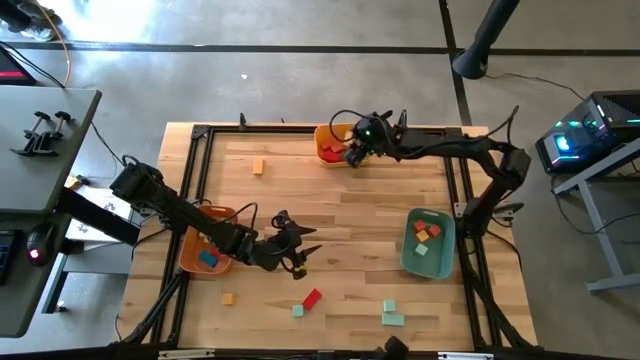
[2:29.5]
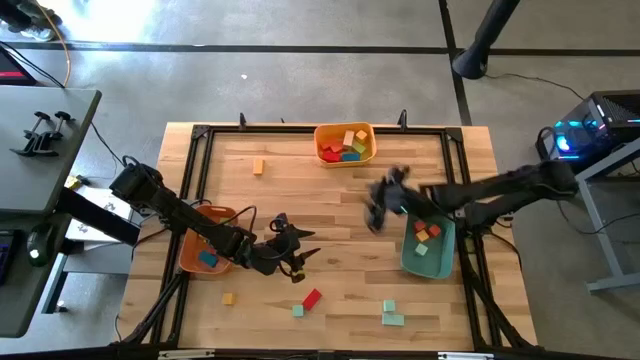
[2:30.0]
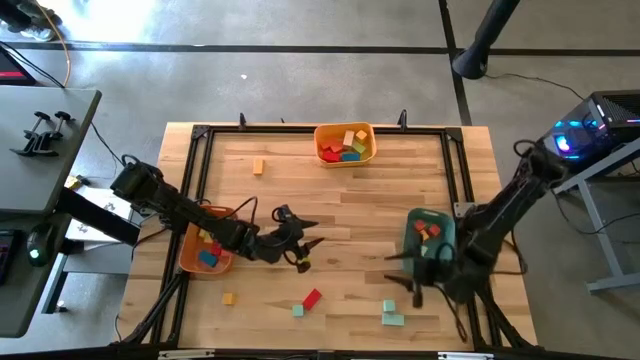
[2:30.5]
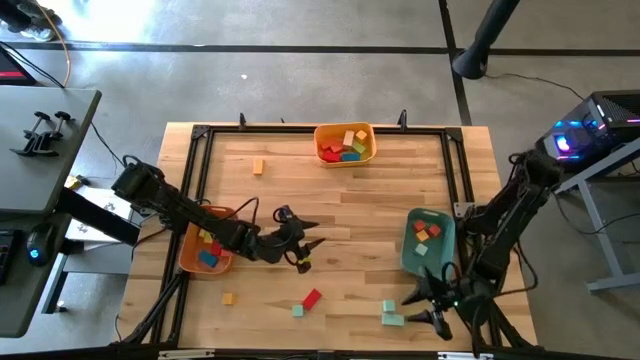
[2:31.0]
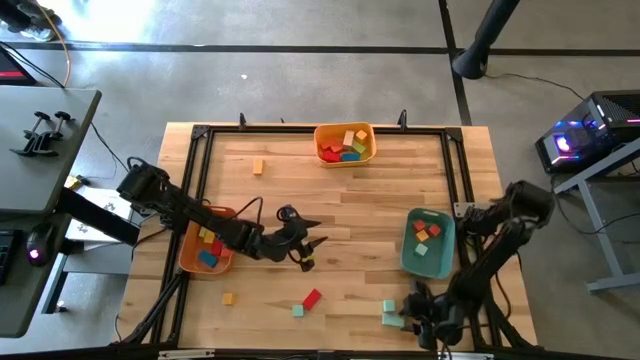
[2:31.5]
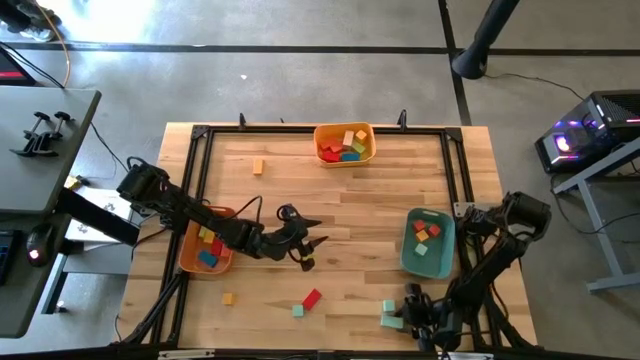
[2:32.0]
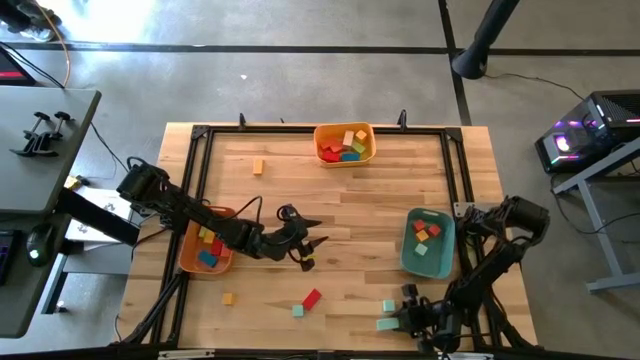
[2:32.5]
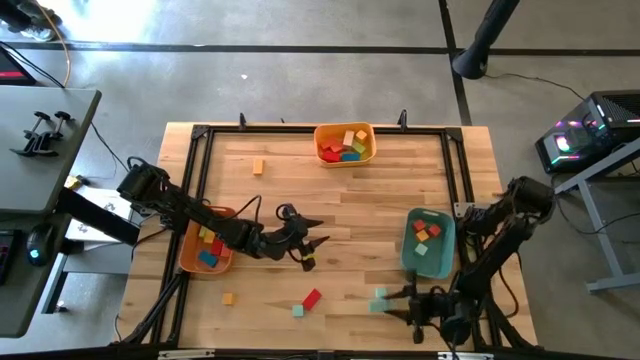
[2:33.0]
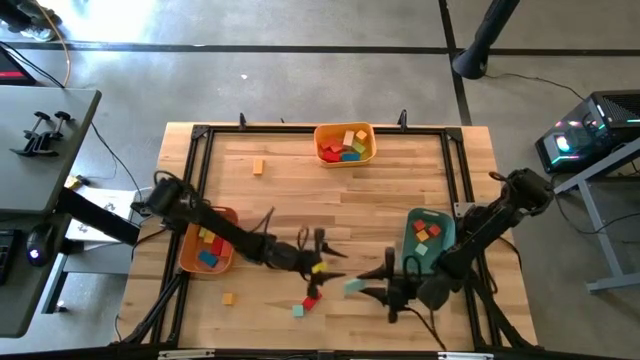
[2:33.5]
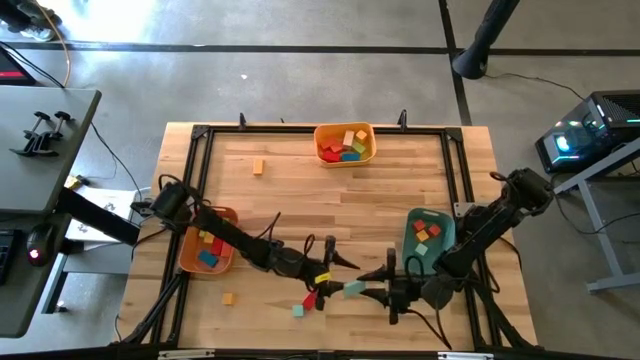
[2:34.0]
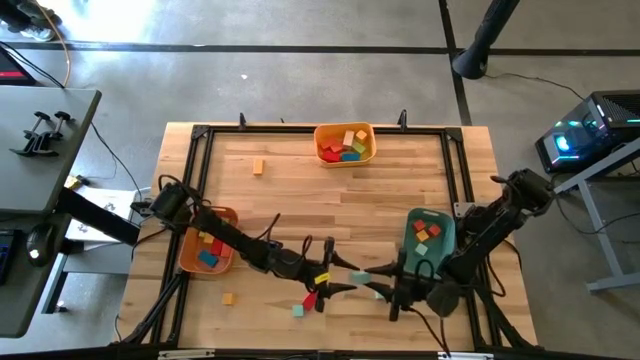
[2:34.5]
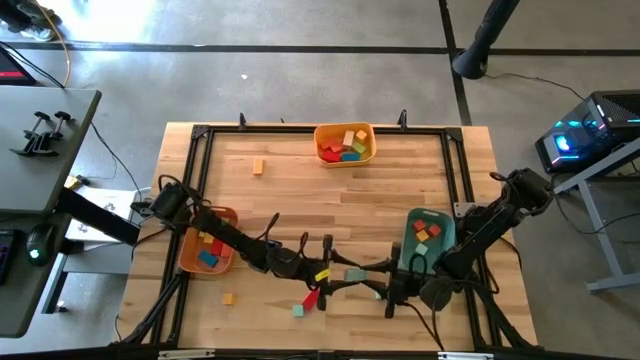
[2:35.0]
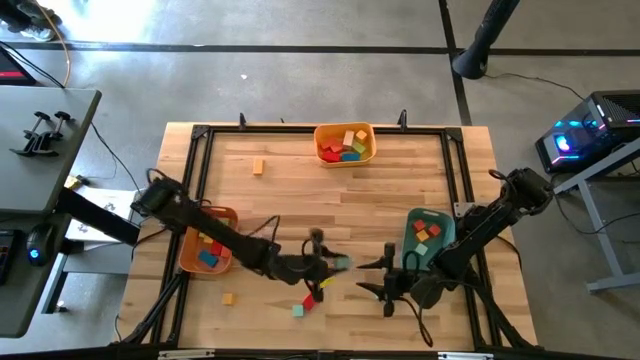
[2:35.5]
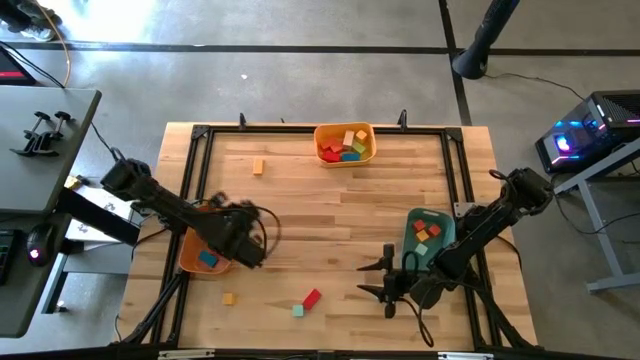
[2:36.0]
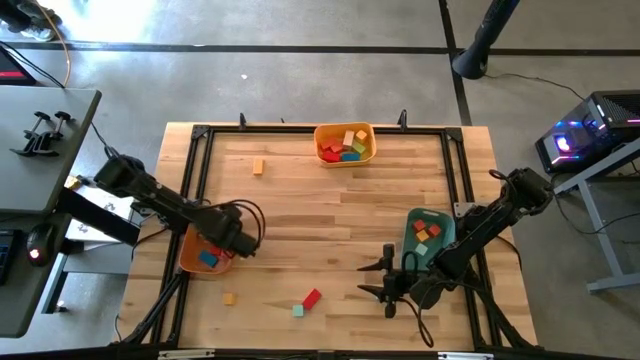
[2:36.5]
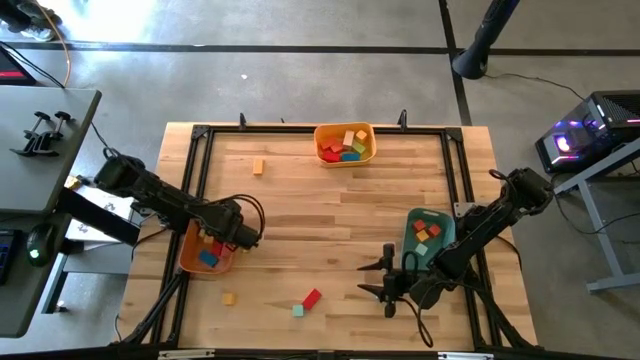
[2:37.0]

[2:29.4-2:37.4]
Task: Sort blocks by size
Put the light blue medium block into the orange bin

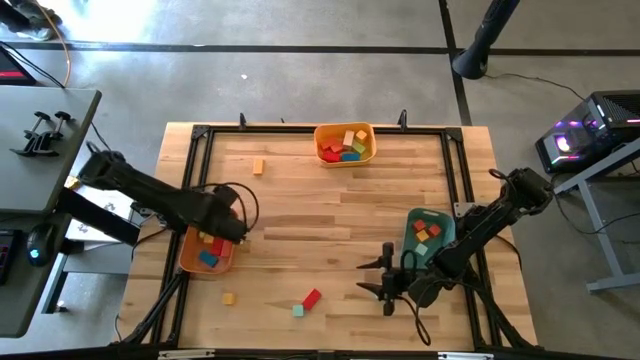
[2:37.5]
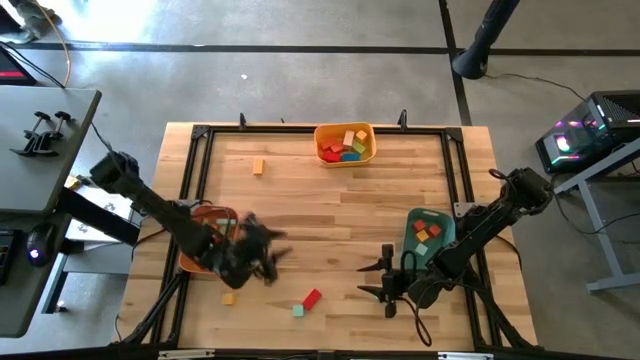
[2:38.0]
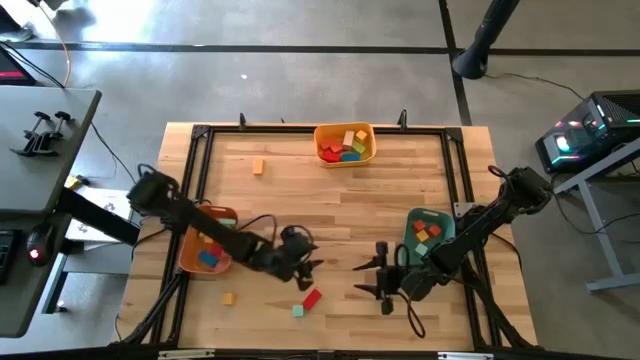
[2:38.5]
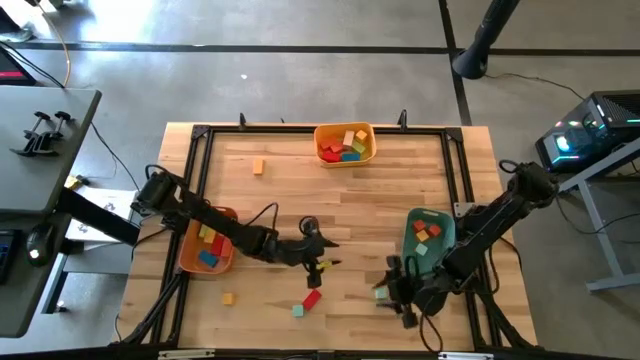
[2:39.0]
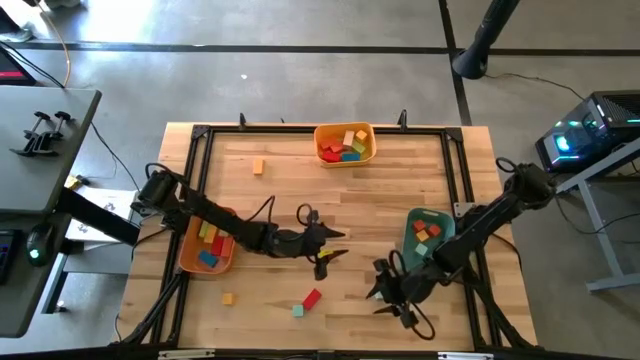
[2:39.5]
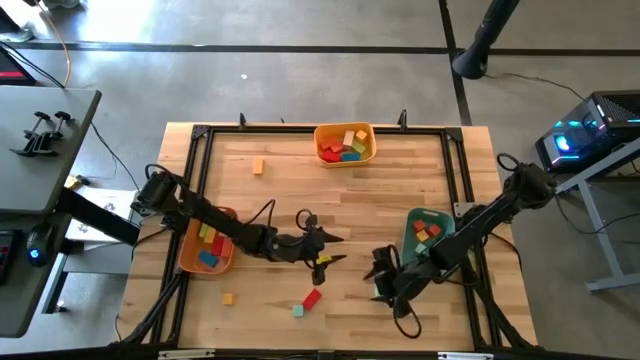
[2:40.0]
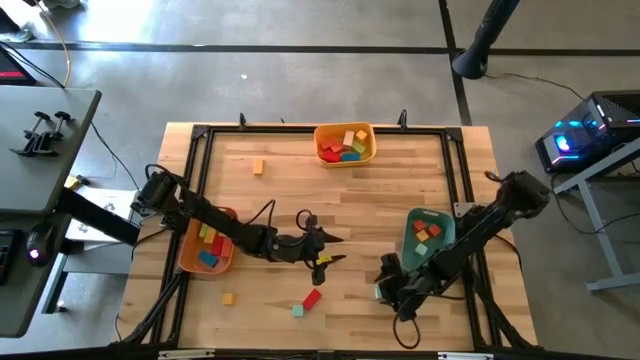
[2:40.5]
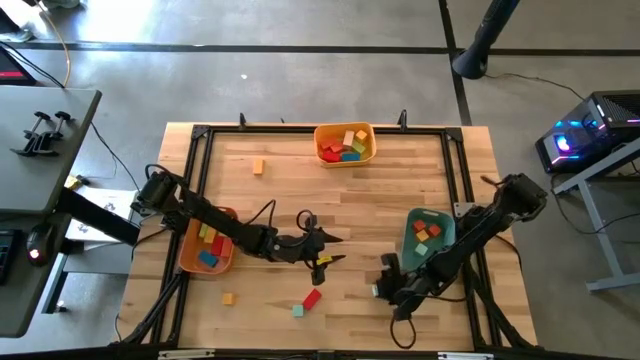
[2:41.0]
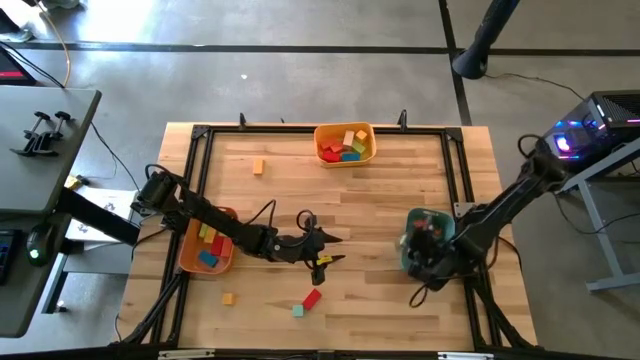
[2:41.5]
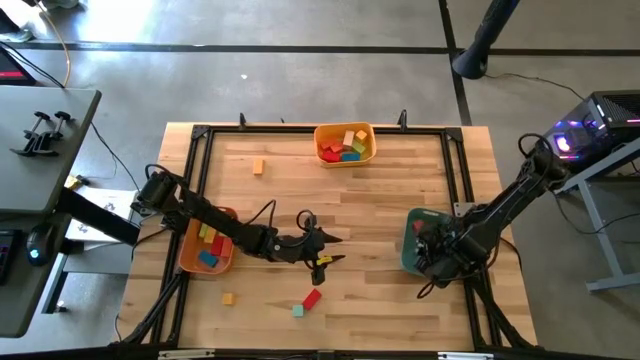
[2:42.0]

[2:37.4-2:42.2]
Put the light blue small block into the green bin

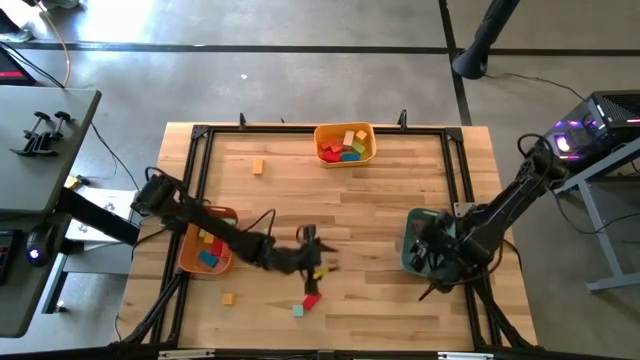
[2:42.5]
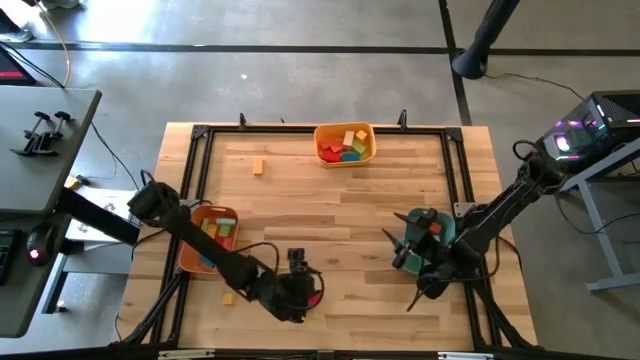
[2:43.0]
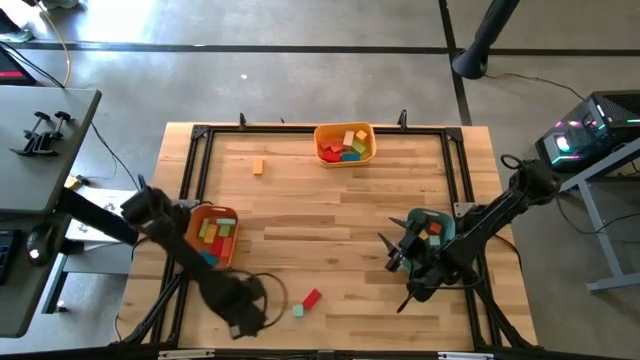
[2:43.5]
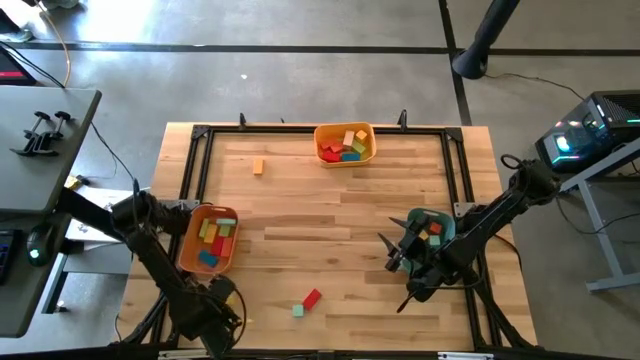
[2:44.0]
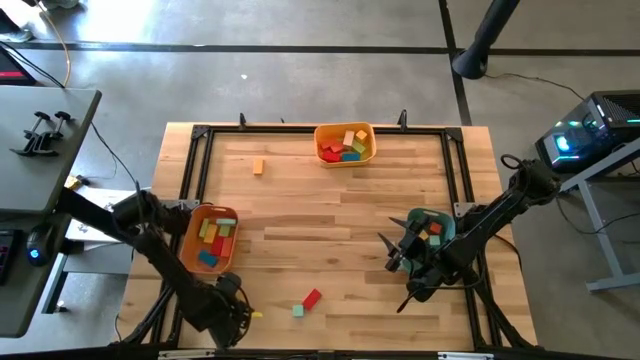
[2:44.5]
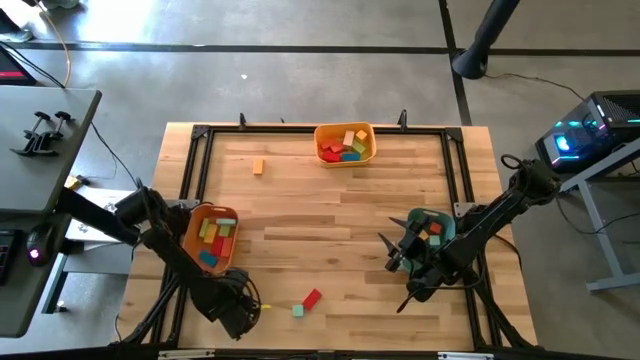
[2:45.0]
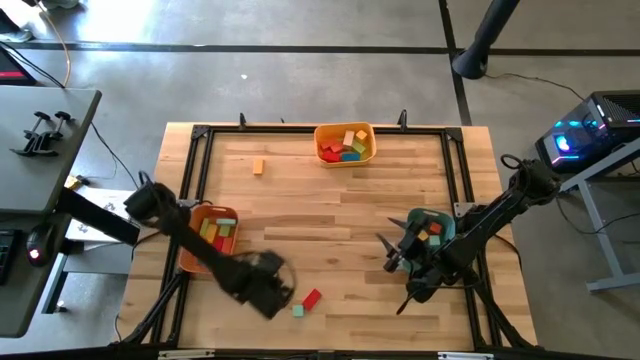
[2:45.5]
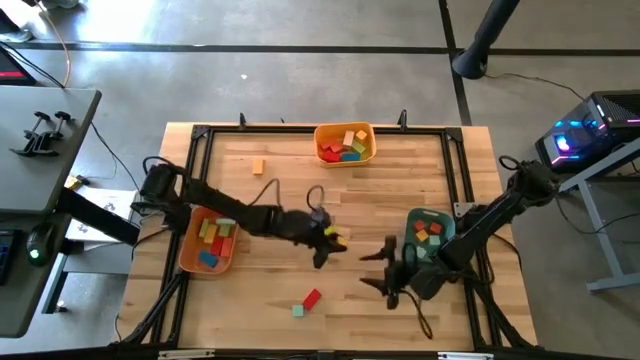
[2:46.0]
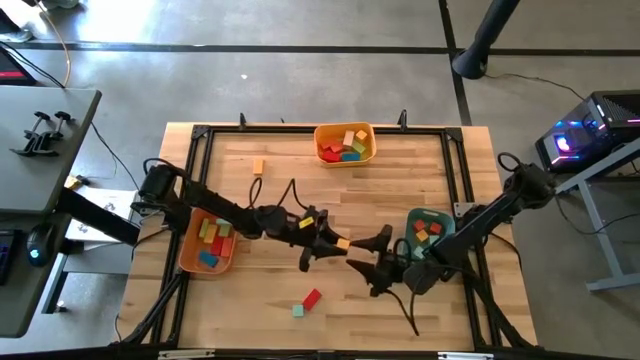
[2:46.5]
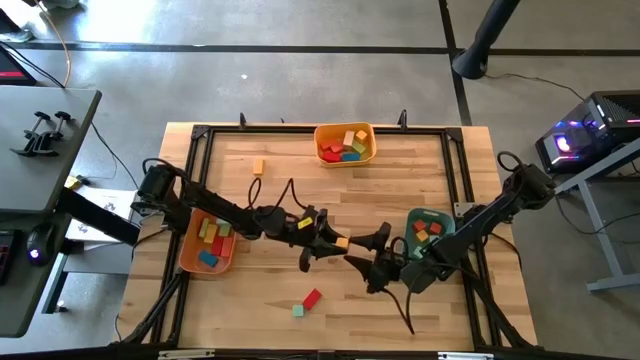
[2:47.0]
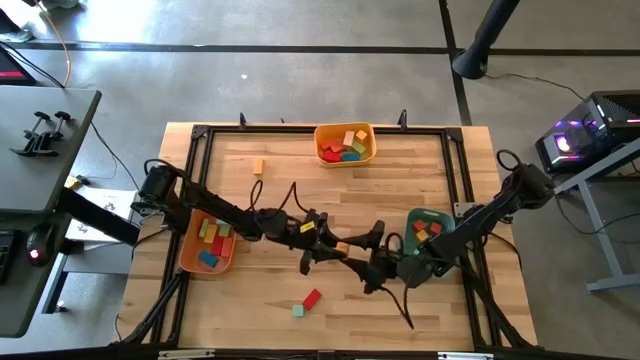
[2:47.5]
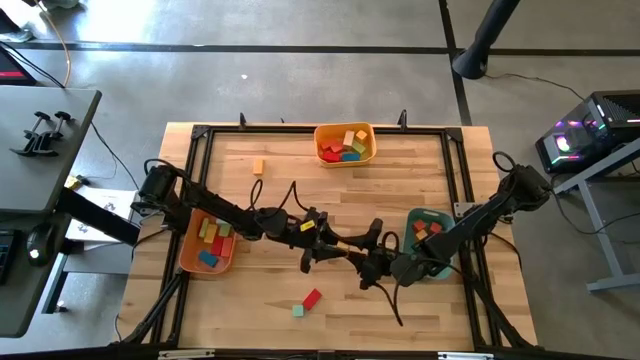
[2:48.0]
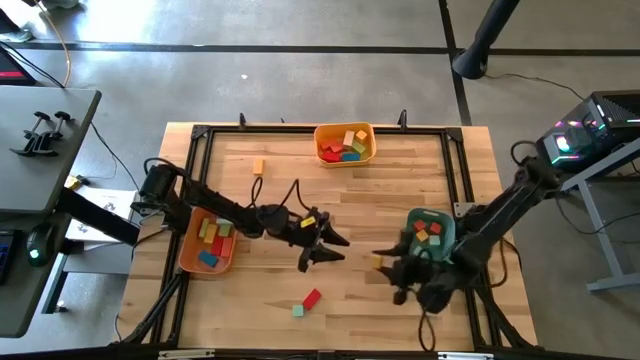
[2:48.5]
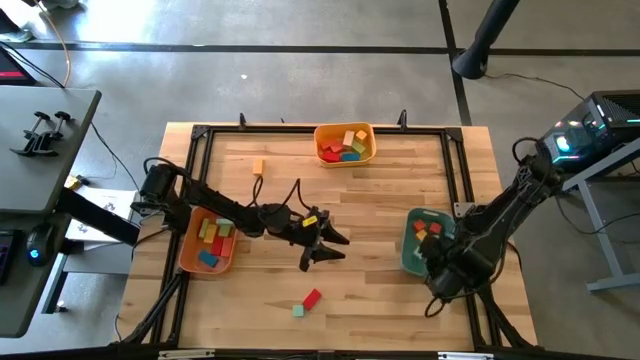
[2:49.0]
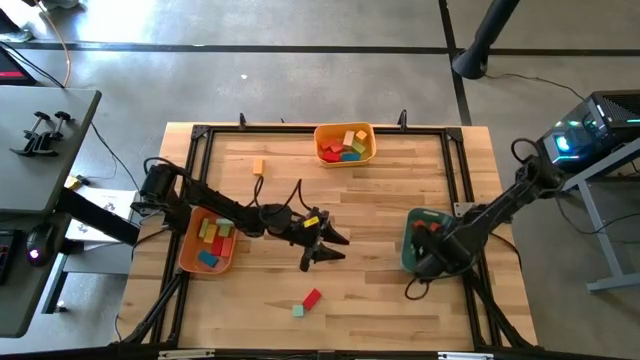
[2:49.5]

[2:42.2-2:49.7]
Put the yellow small block into the green bin
